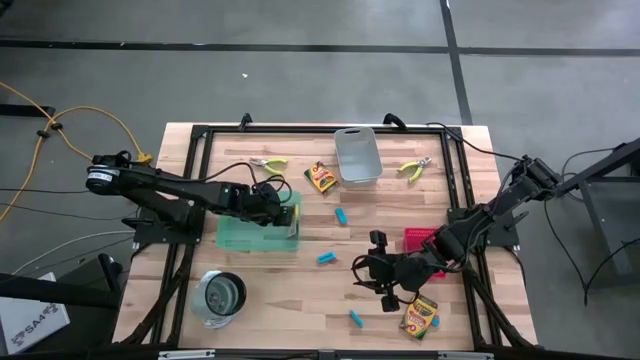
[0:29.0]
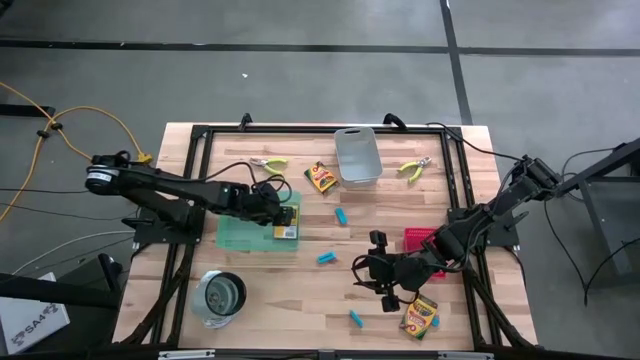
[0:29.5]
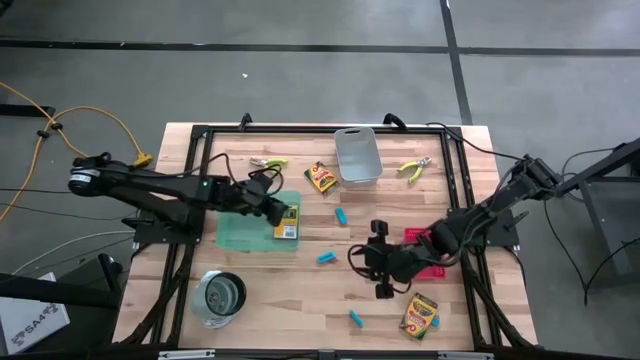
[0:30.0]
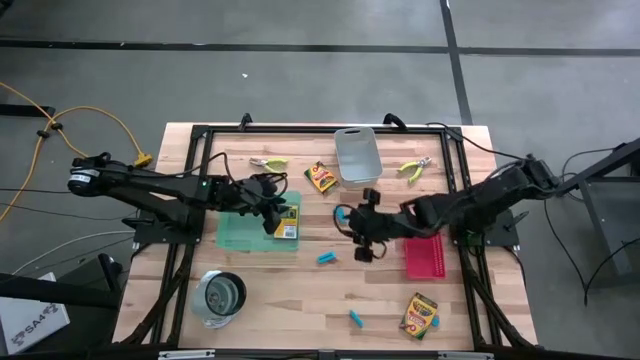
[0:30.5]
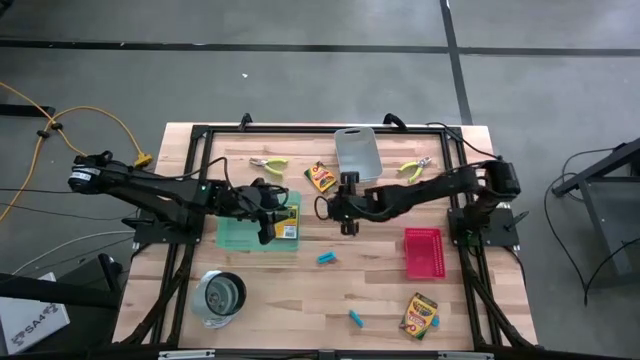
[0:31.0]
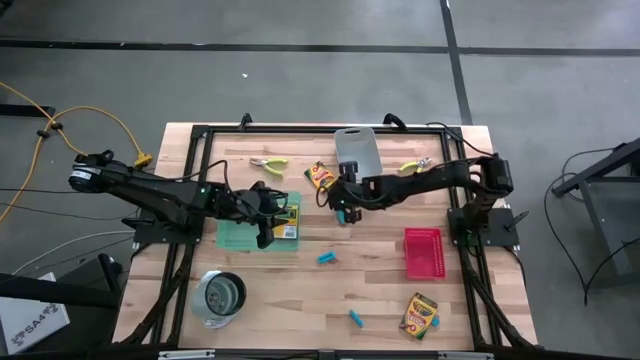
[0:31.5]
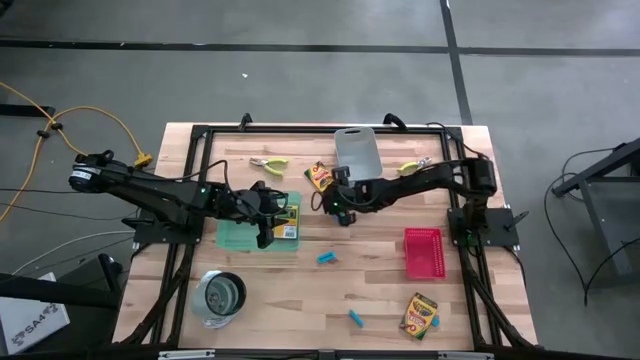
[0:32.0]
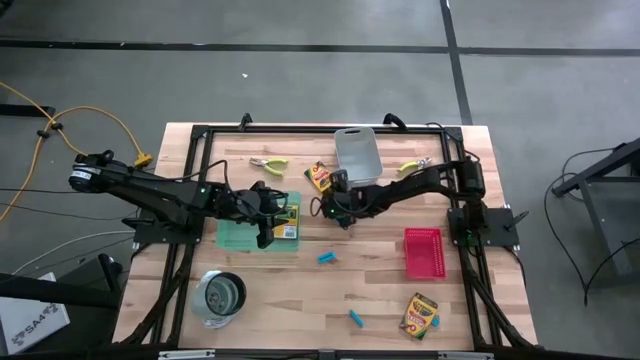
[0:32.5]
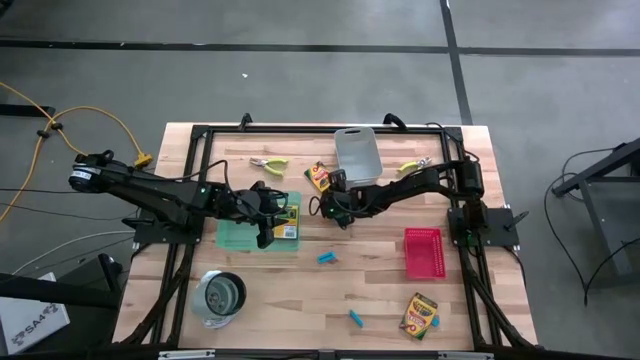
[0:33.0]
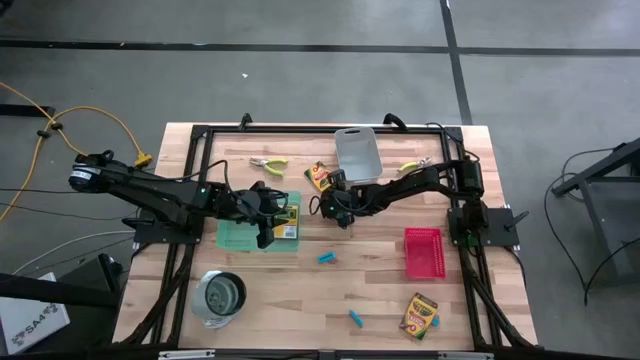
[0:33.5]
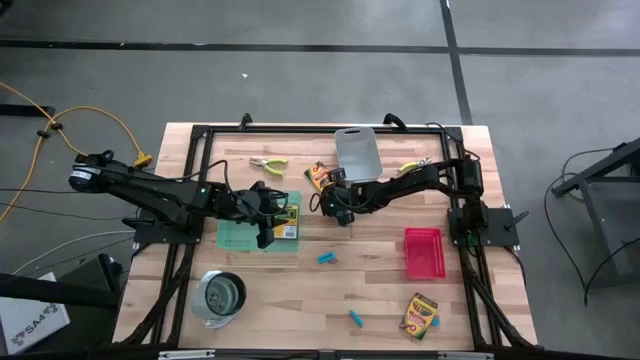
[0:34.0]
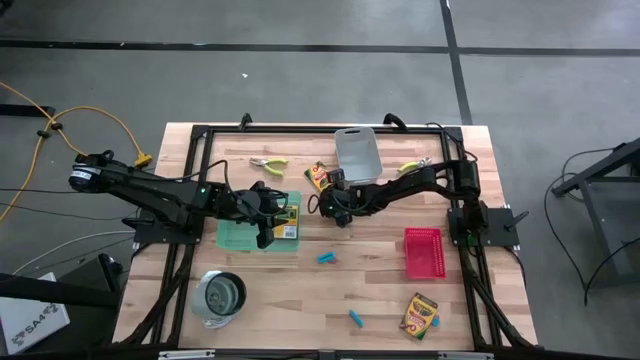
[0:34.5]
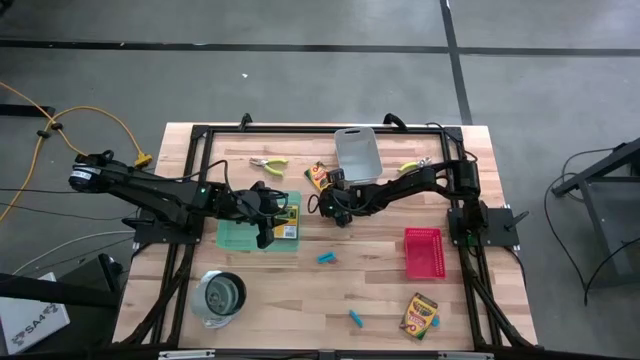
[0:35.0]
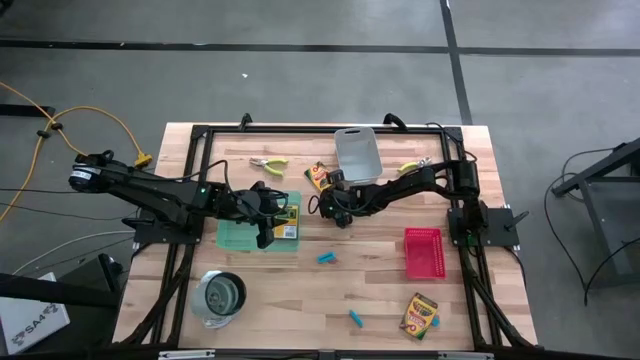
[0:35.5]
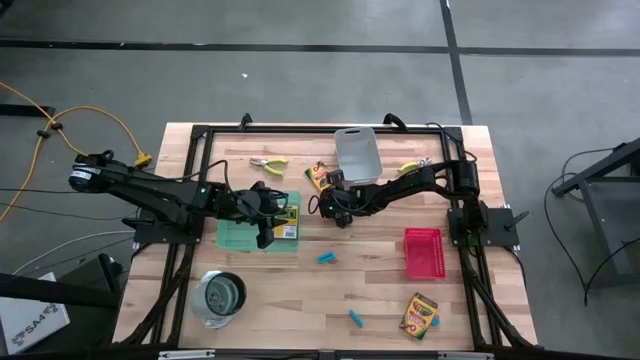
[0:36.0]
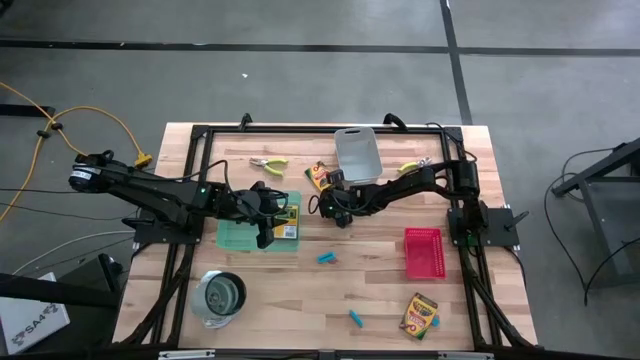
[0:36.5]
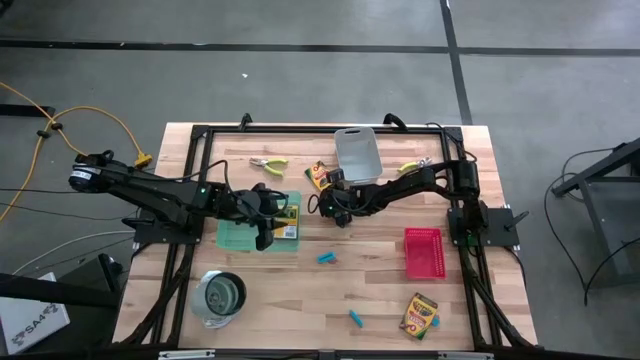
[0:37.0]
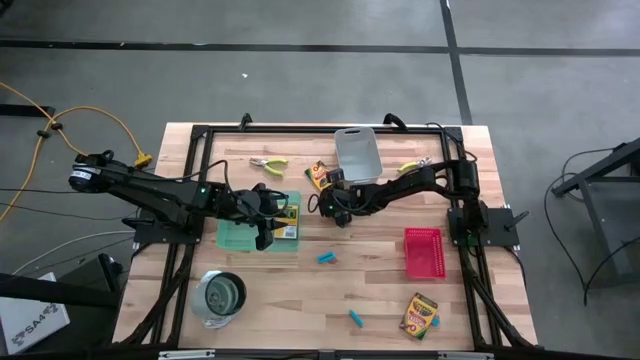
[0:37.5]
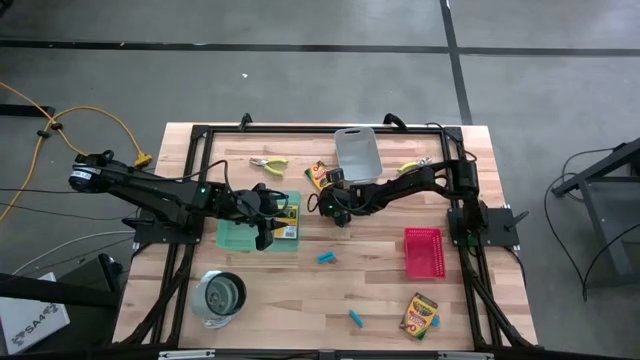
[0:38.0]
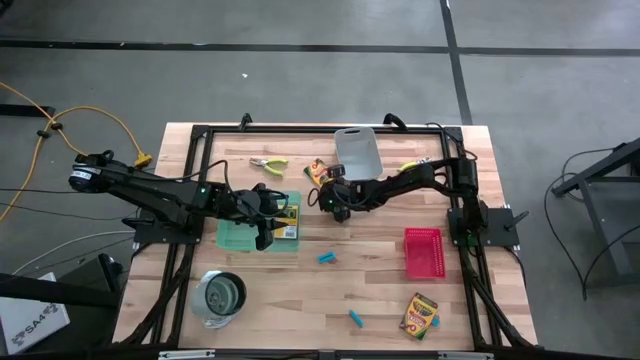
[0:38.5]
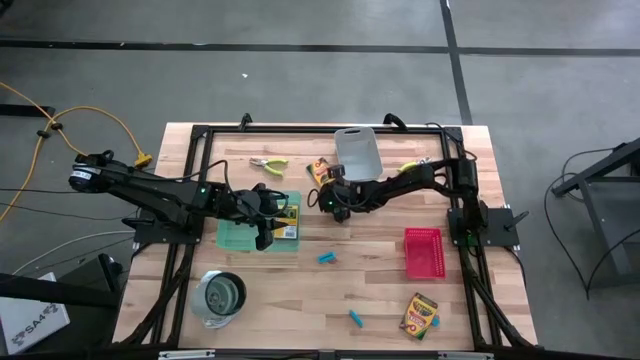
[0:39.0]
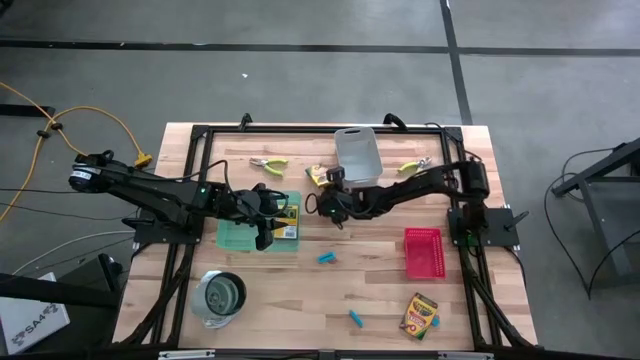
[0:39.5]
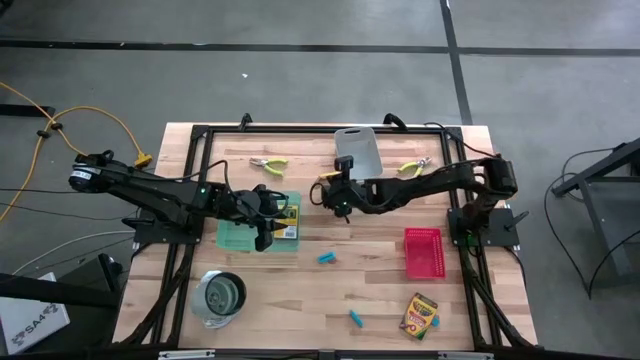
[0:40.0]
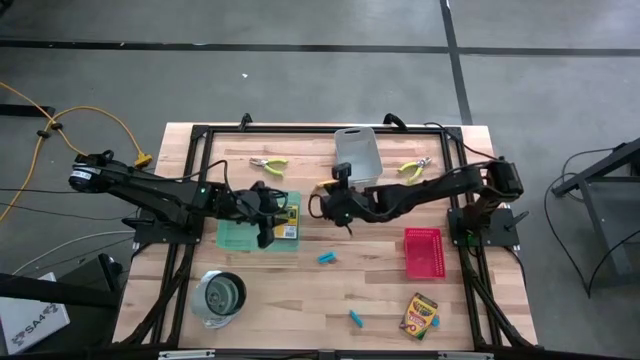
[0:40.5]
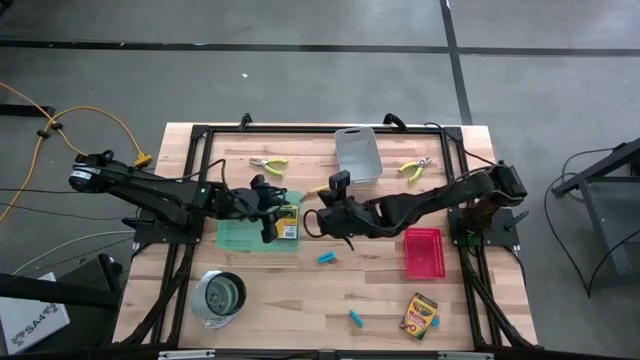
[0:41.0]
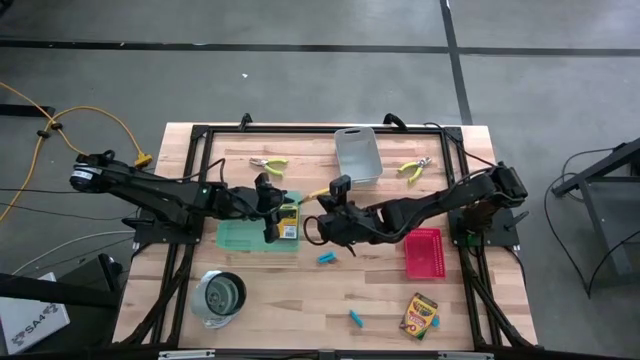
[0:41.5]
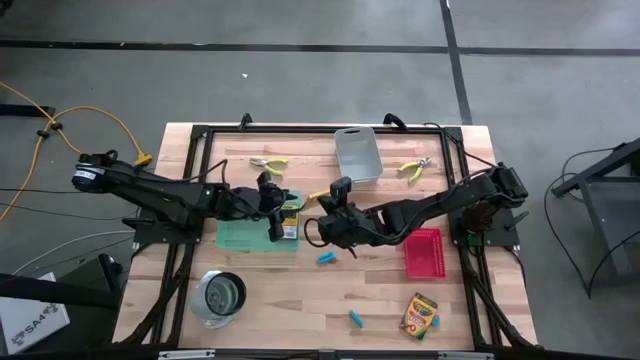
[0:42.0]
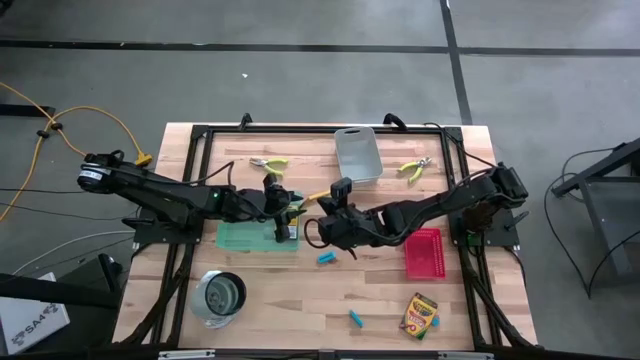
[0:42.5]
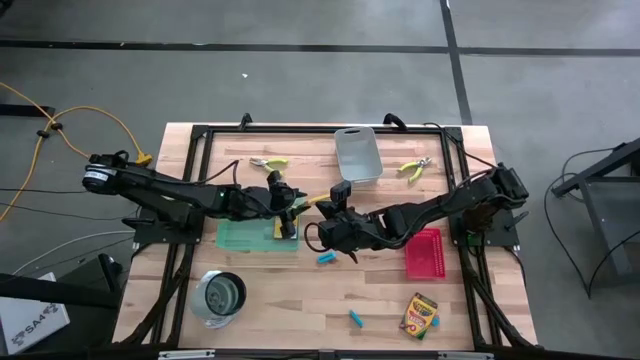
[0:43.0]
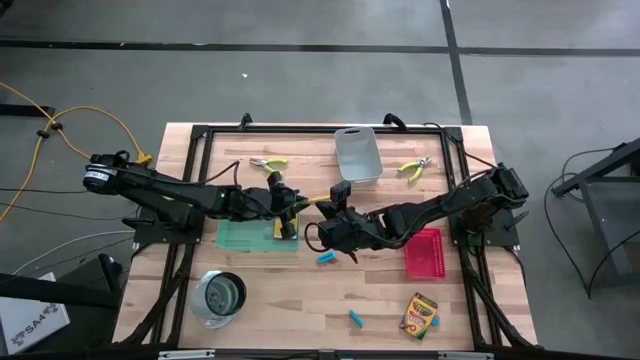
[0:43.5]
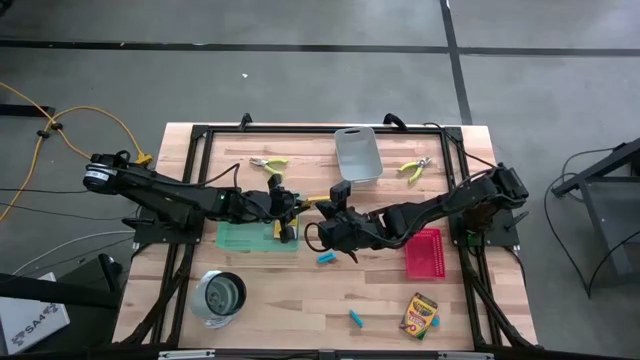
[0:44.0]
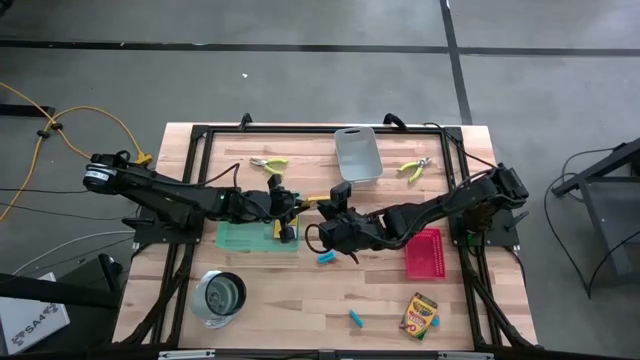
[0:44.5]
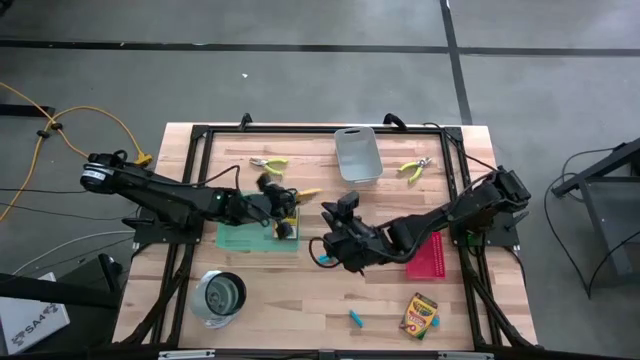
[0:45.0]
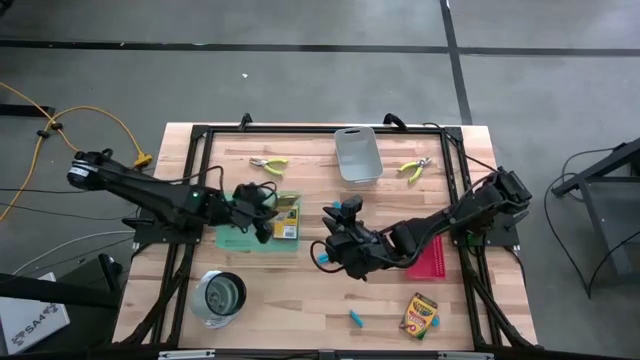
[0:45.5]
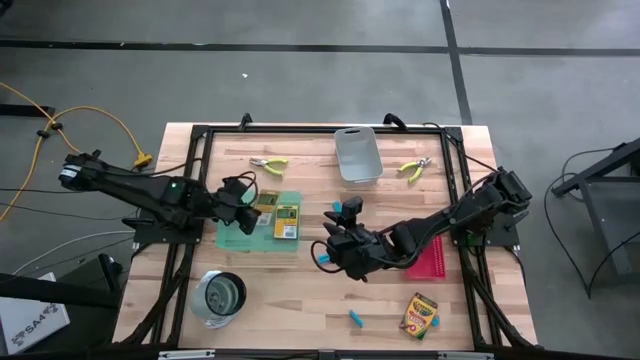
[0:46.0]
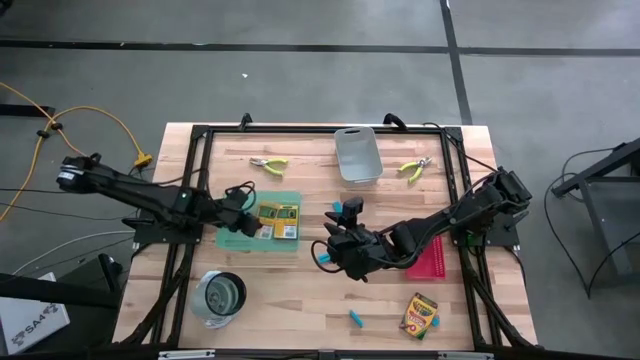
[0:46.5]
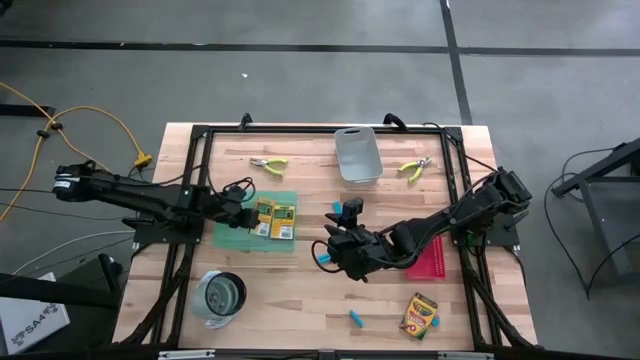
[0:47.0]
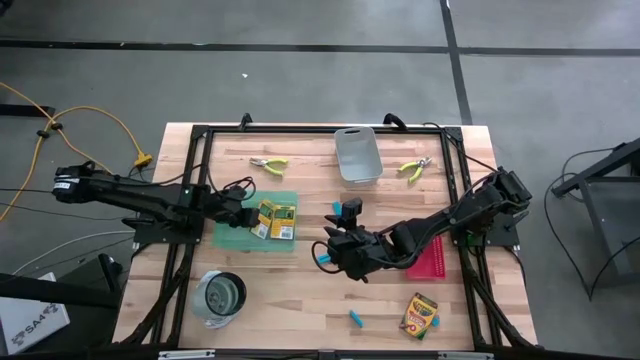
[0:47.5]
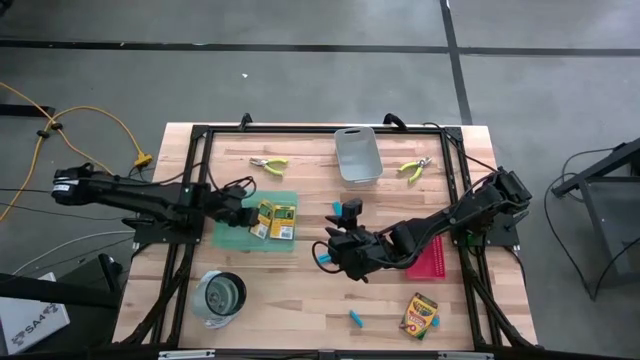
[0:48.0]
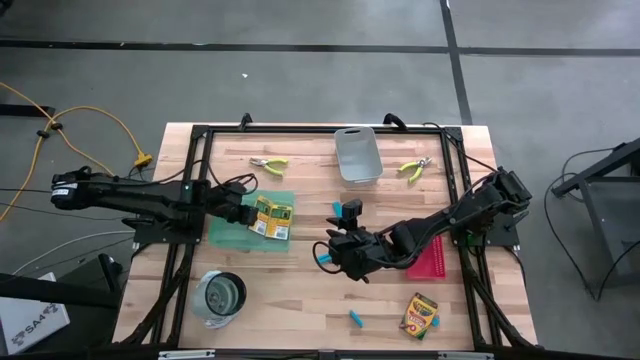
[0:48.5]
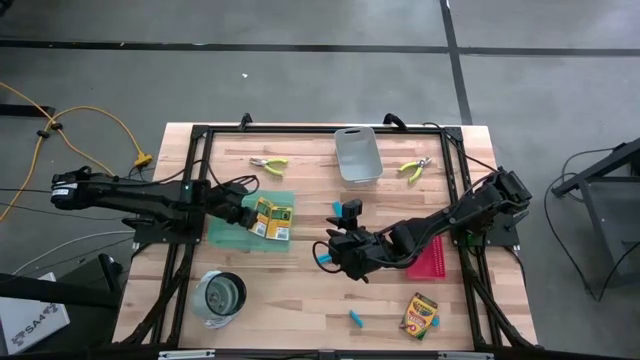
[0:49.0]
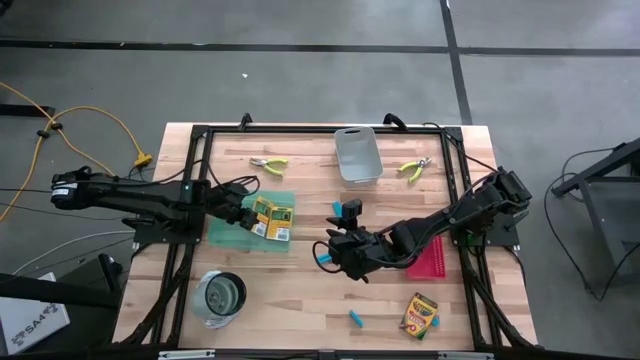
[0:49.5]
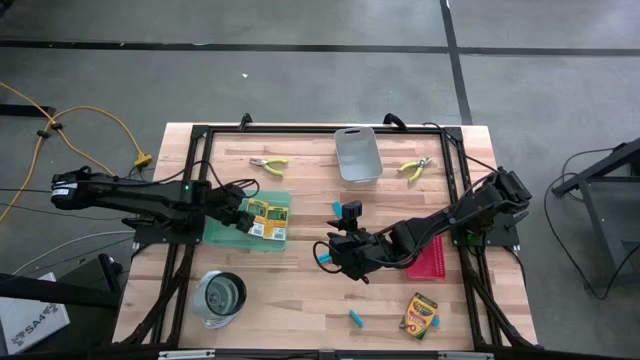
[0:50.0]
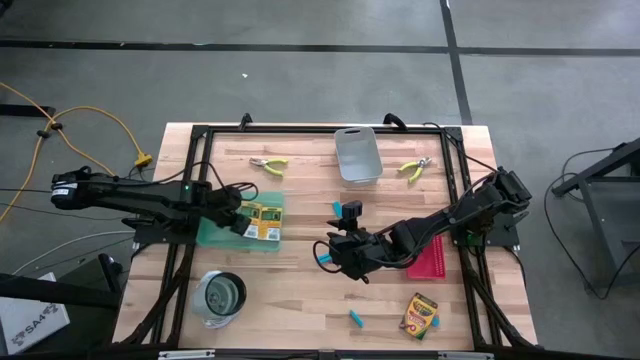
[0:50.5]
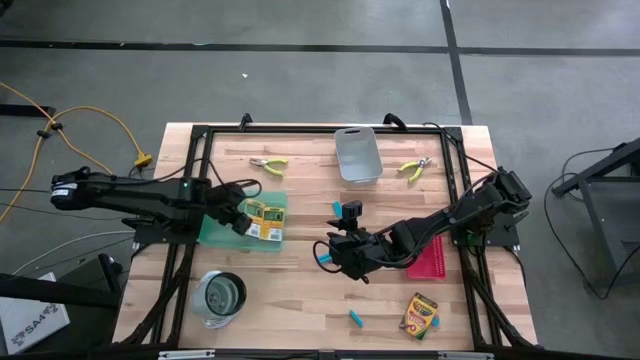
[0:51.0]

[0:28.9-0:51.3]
Task: Pick & Place School Supplies
Put the crayon box into the green bin
